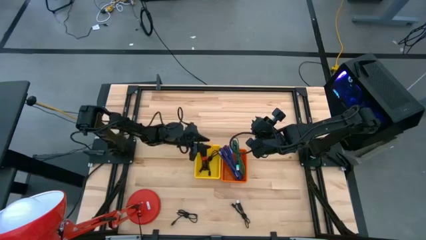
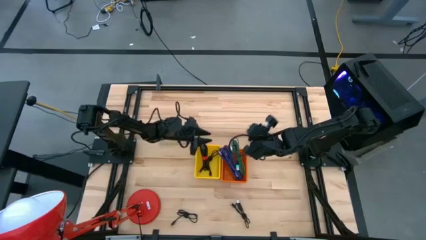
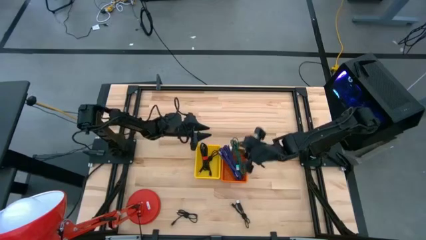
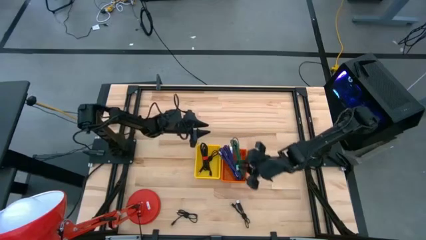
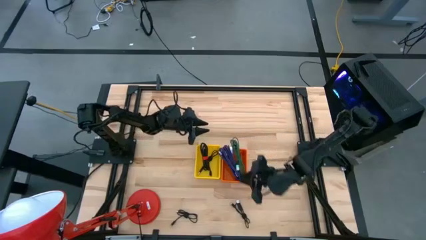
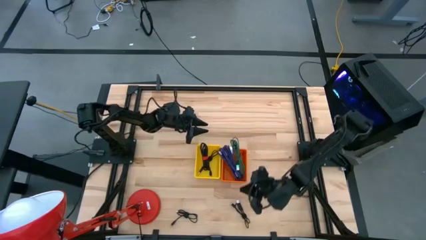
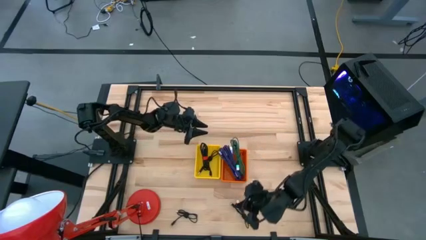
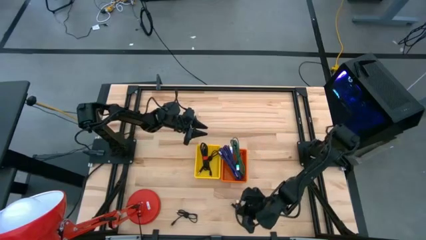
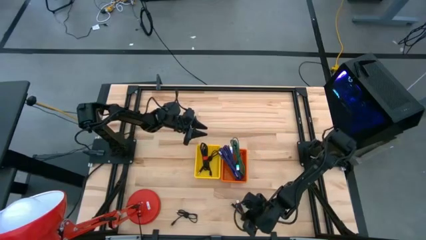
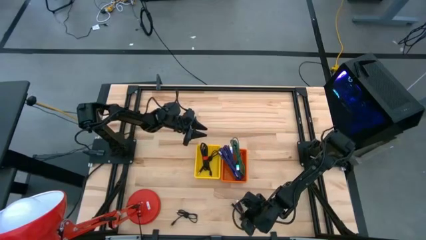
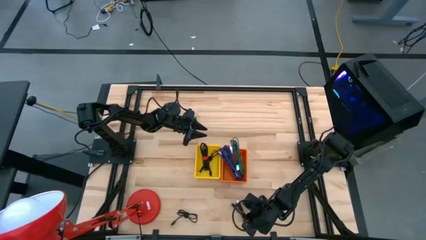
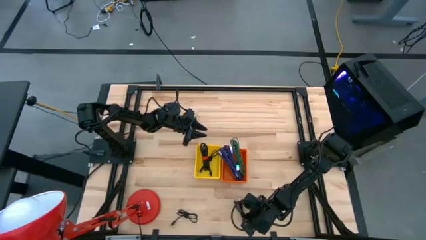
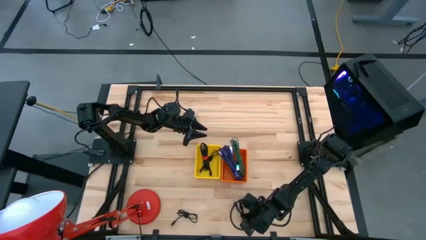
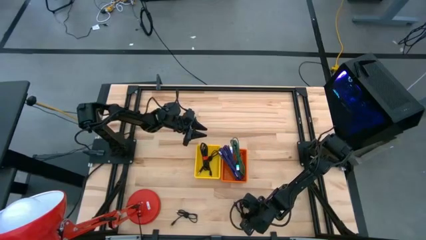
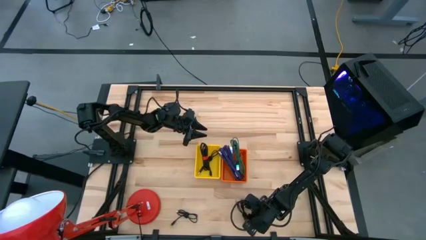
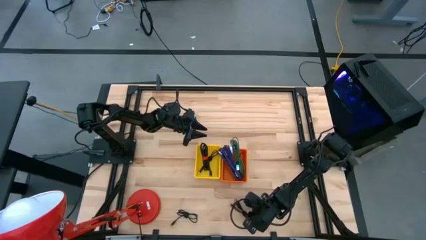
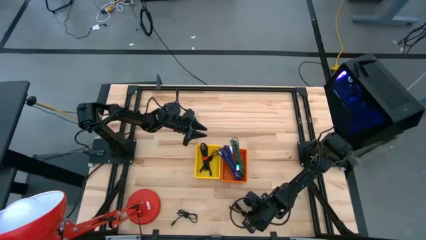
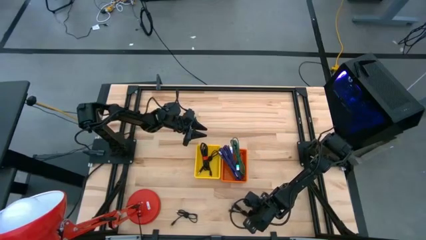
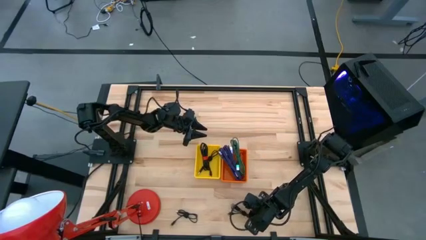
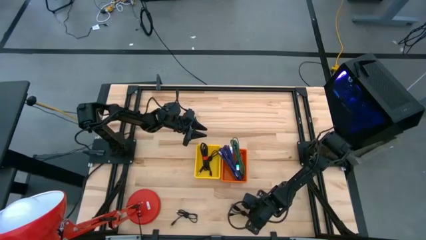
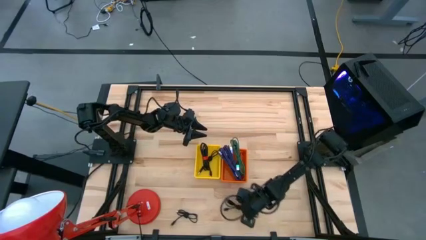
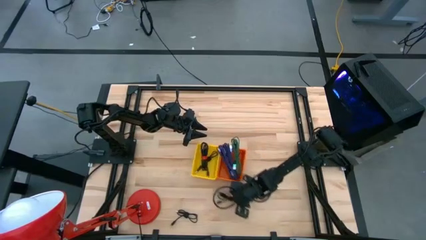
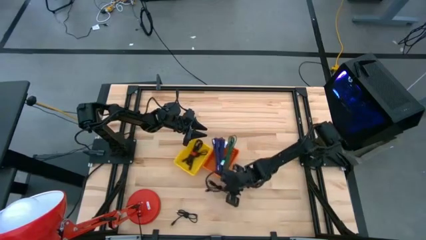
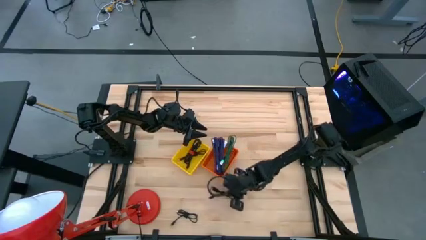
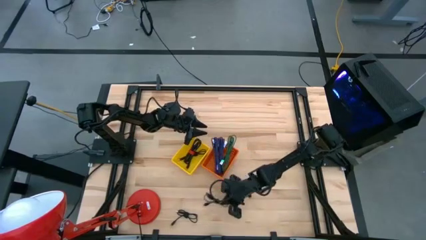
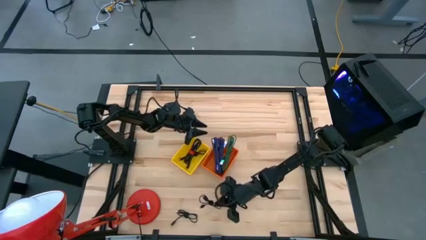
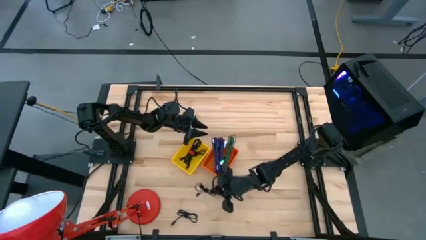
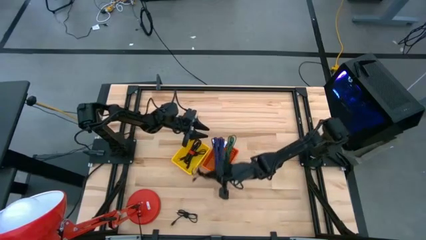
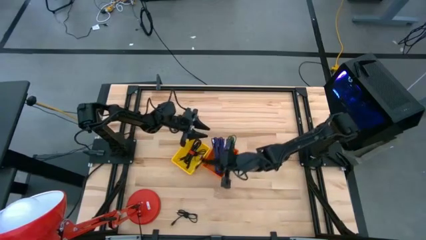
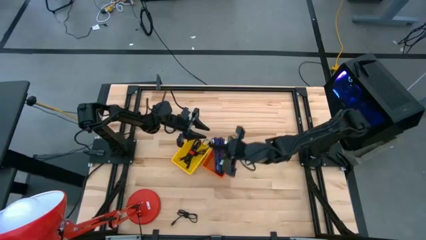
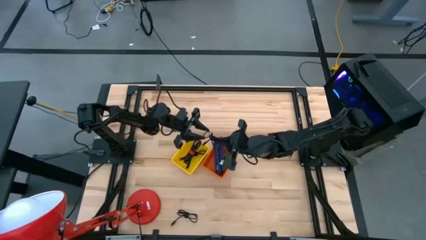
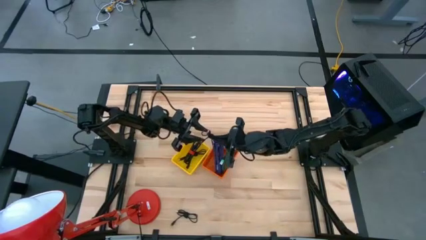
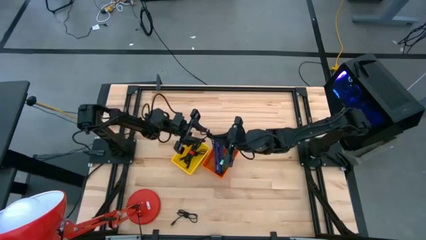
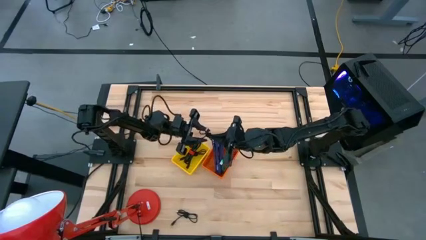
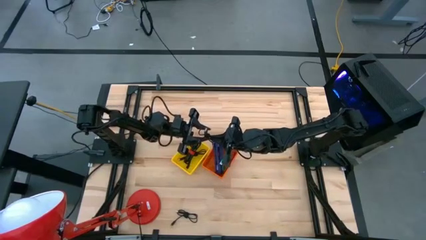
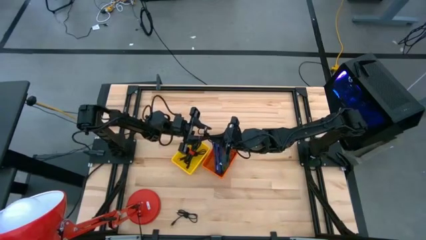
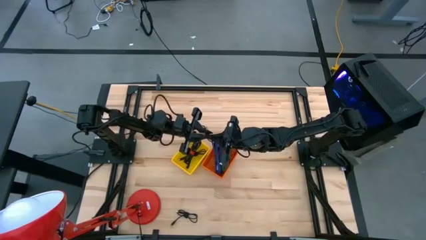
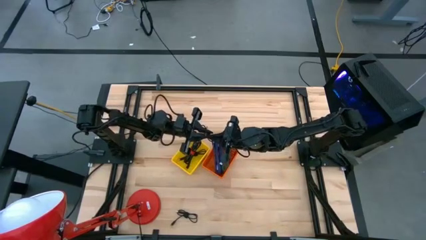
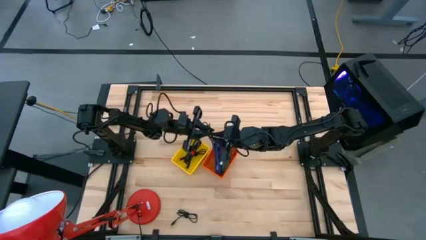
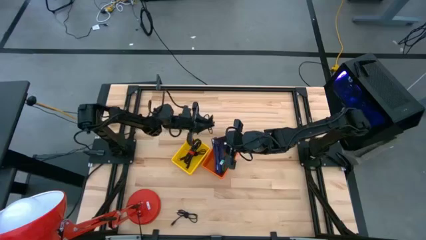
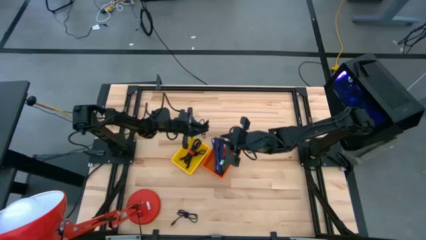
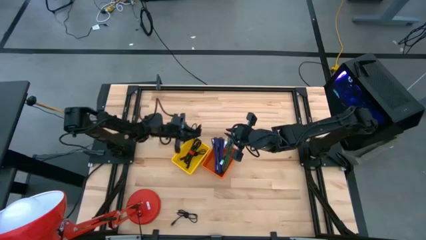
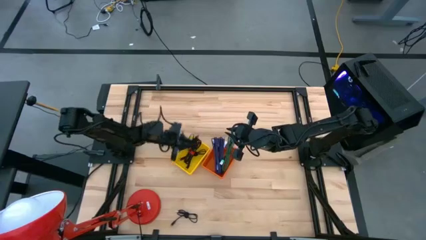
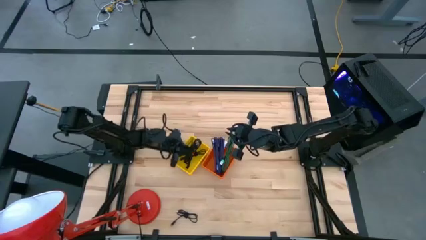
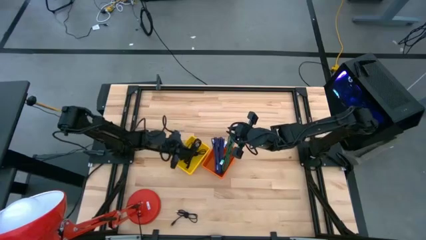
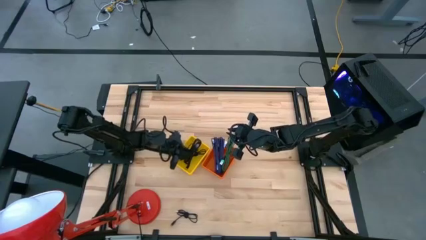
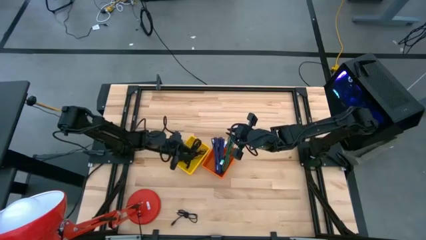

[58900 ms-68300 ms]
Task: Pick & Place USB Port
Put the right black charger cable into the yellow bin

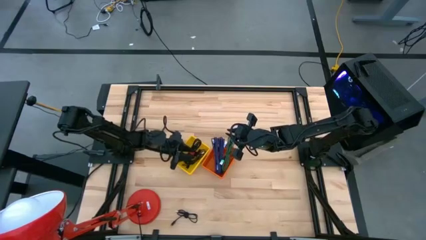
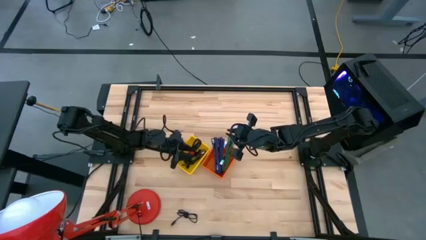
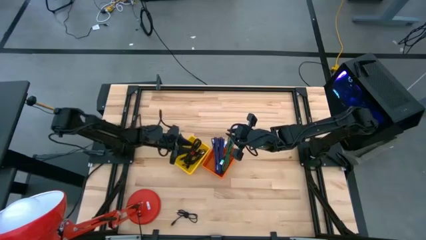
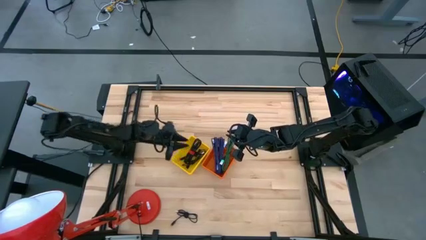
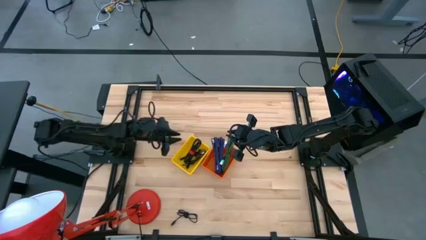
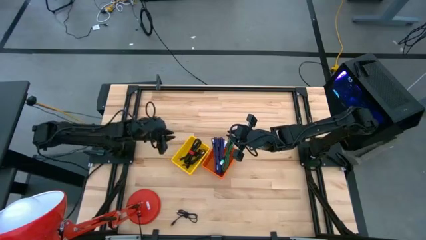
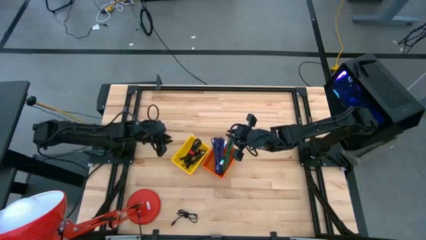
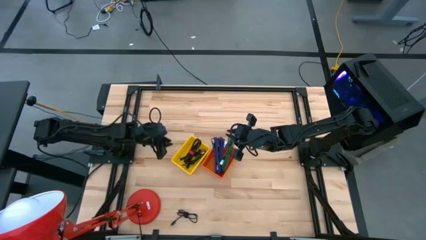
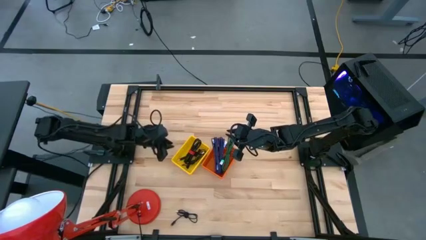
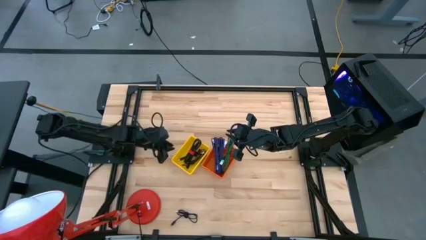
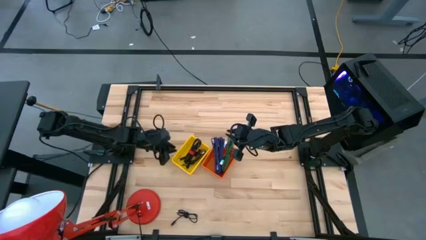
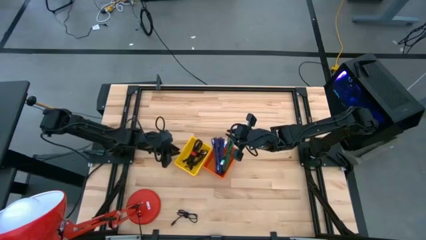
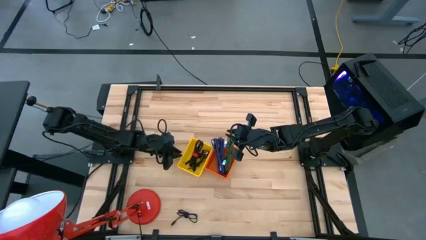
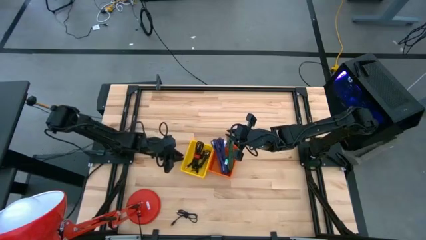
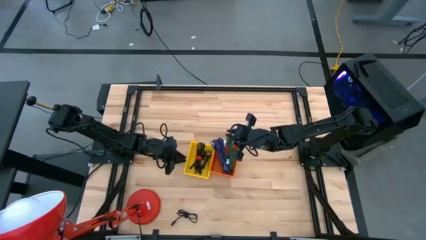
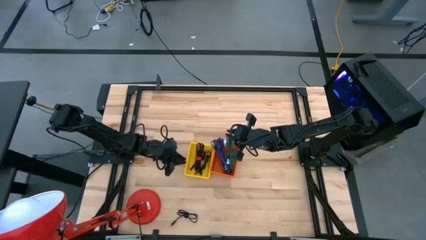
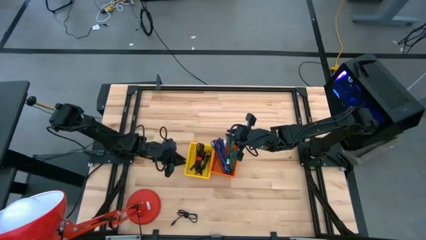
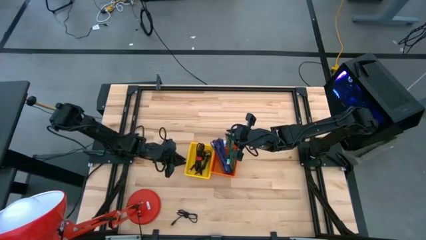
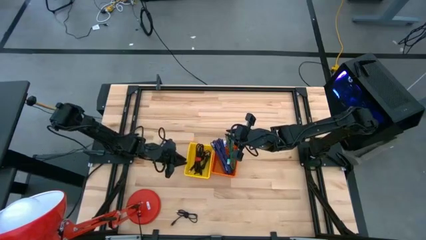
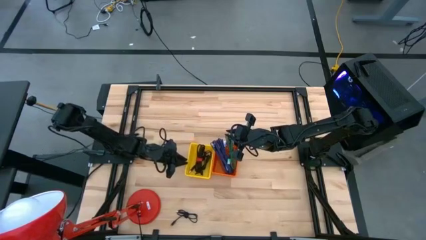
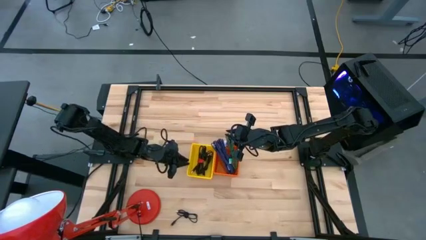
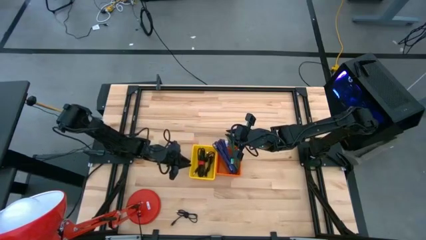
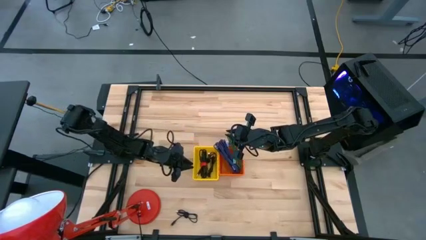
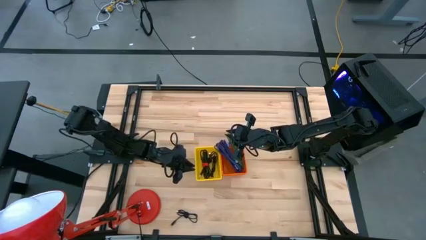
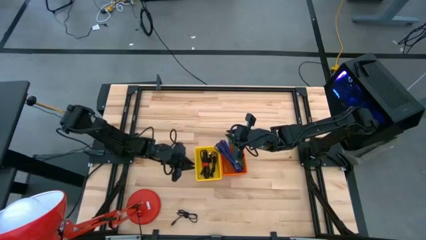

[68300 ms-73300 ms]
Adjust the yellow bin
